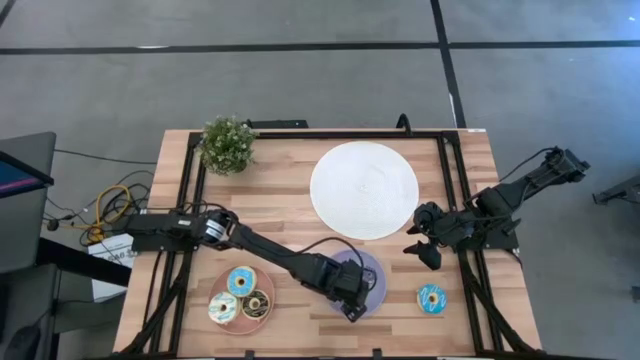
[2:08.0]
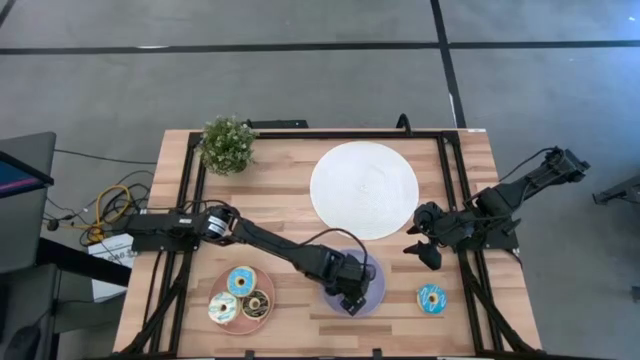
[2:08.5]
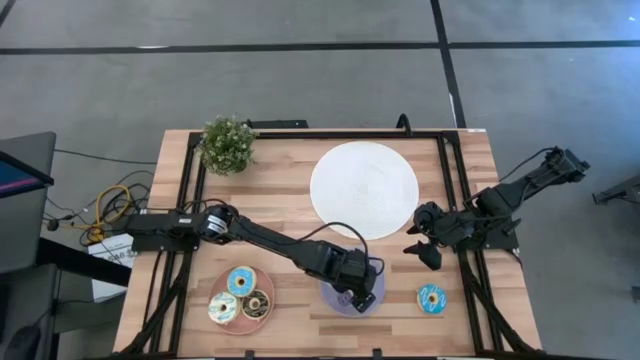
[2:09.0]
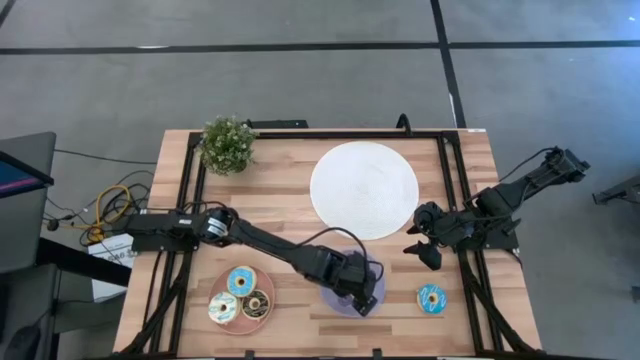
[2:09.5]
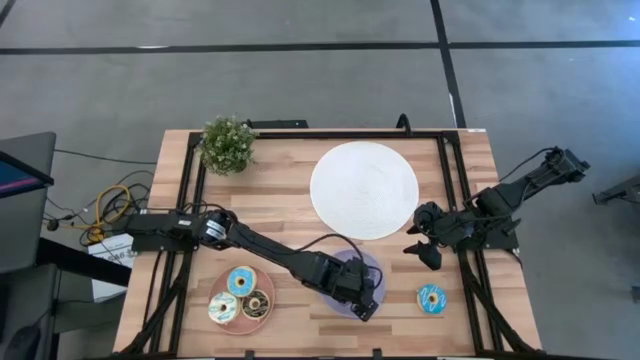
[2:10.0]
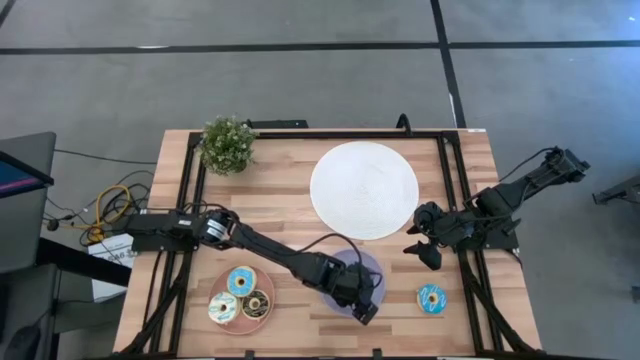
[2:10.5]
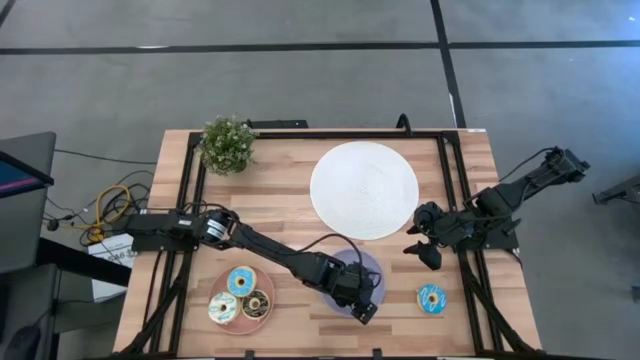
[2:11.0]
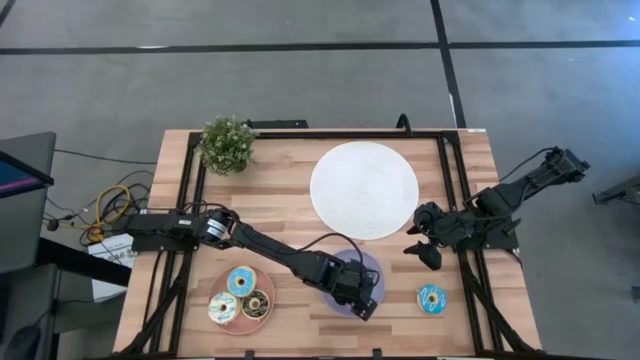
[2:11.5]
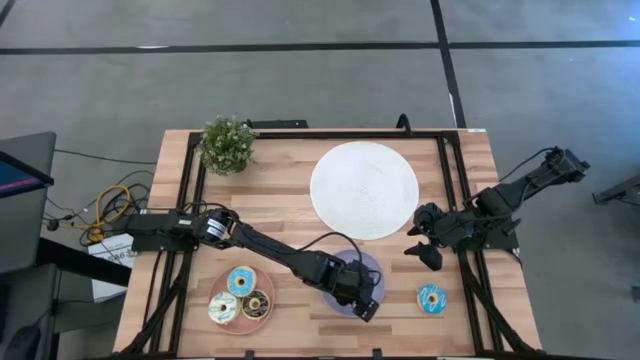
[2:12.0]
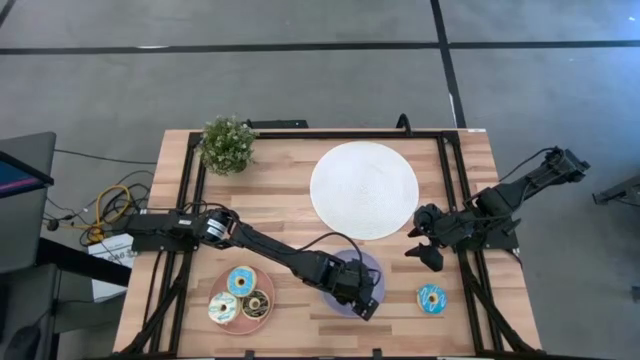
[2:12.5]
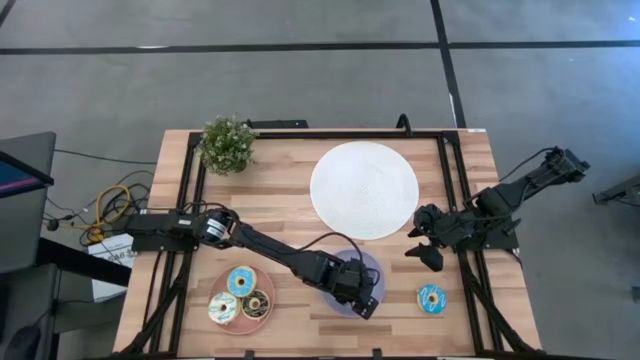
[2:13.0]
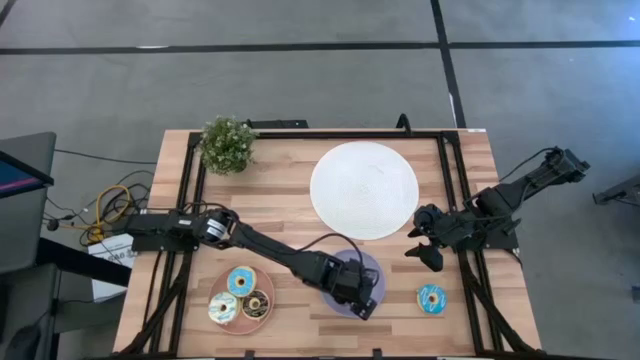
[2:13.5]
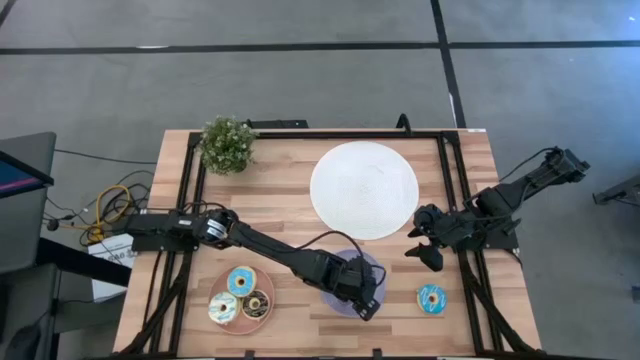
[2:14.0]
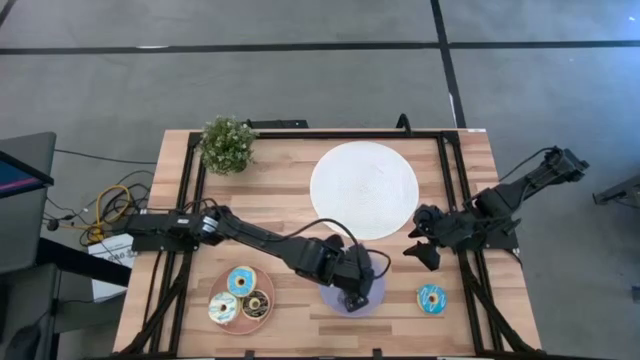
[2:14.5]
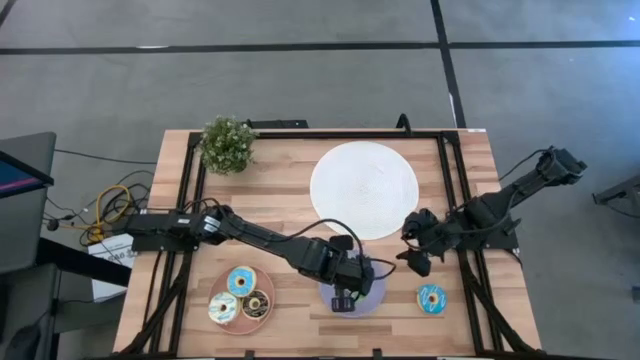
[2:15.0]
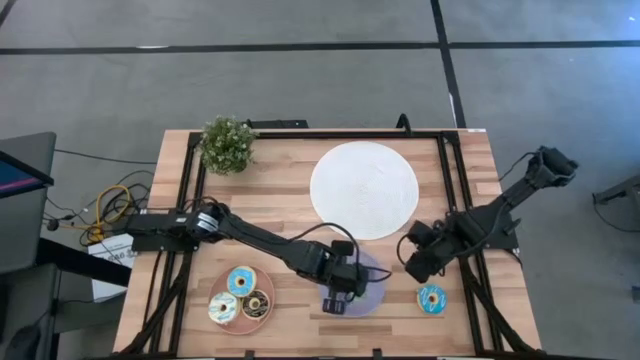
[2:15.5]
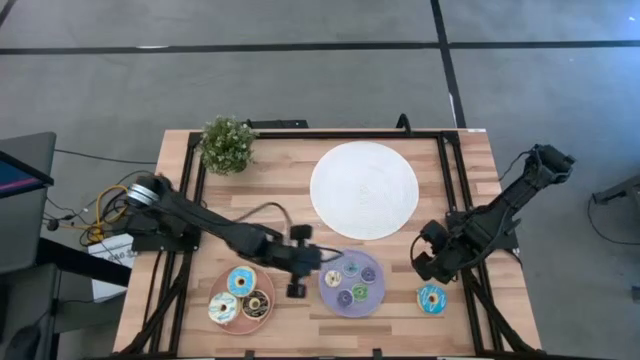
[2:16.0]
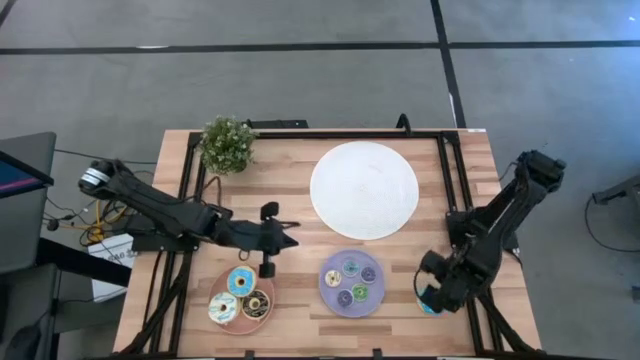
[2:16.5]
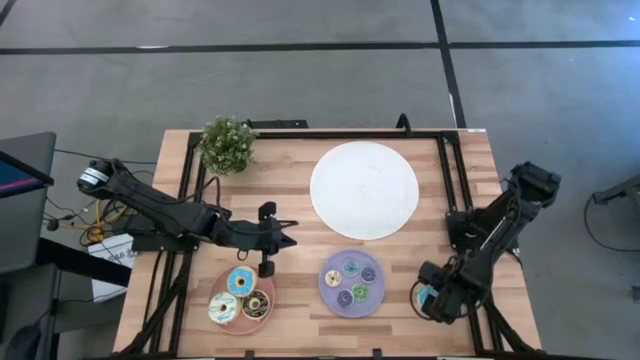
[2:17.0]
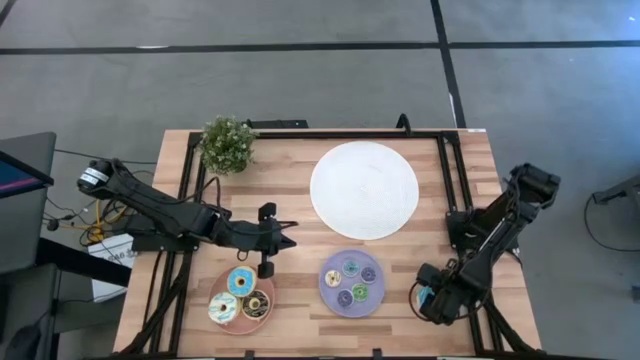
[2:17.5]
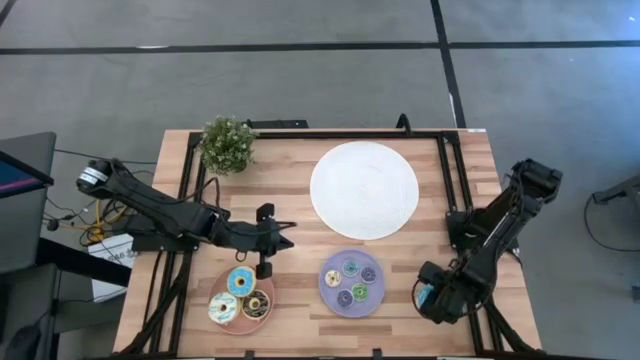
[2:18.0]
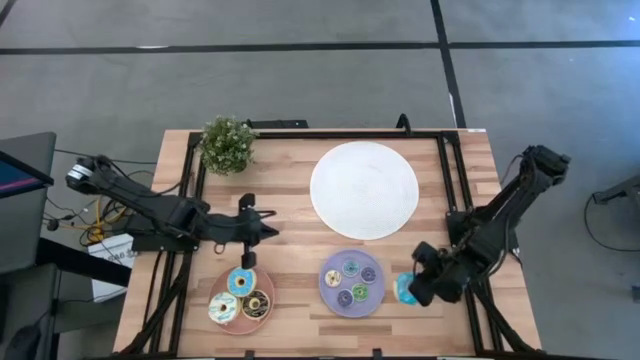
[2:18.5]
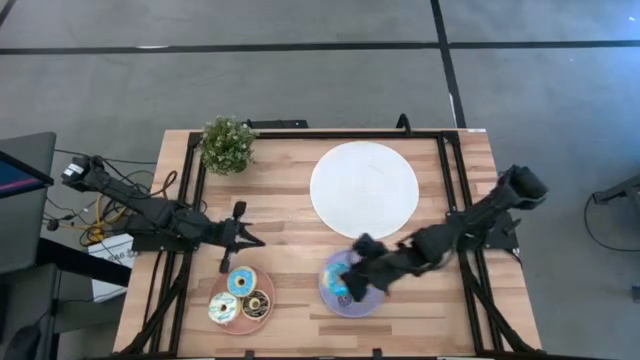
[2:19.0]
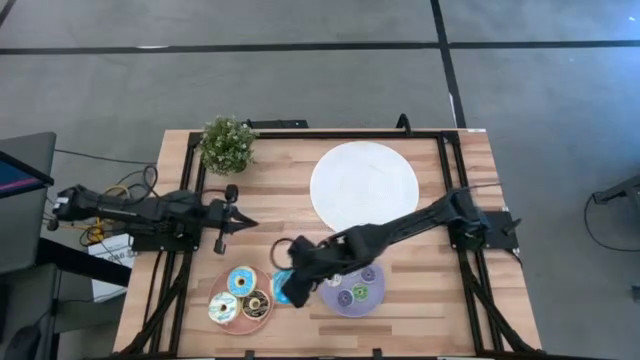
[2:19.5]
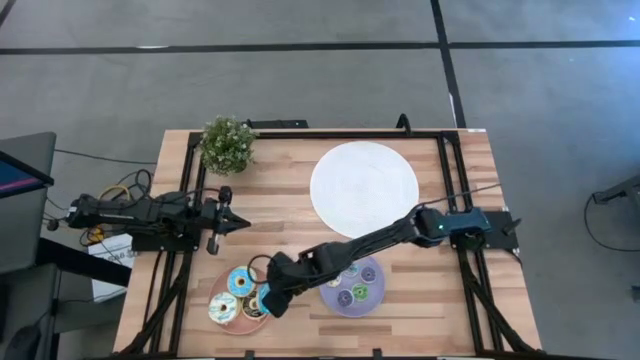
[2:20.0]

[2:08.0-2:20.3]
Task: Pick & Place donuts
Put the big light blue donut on the pink plate

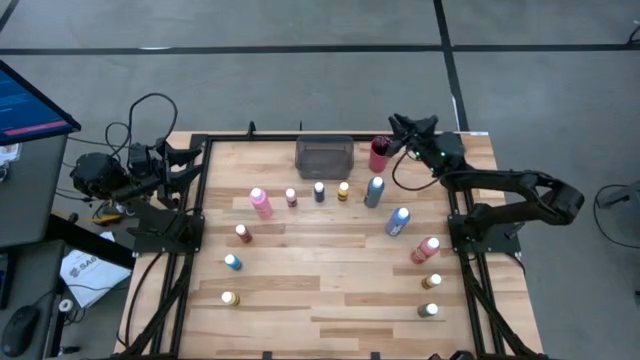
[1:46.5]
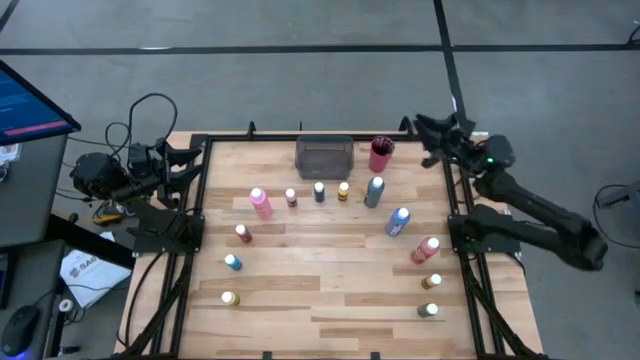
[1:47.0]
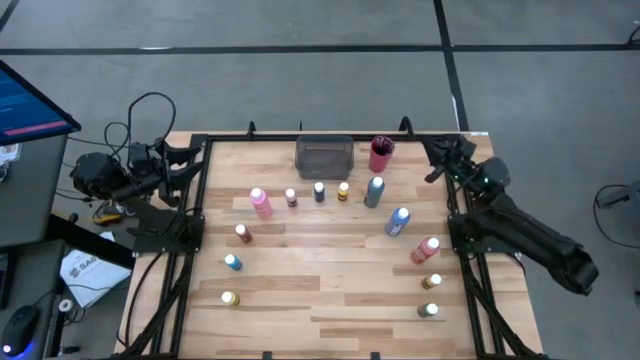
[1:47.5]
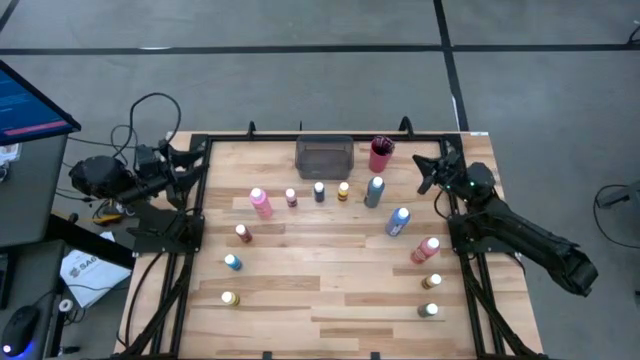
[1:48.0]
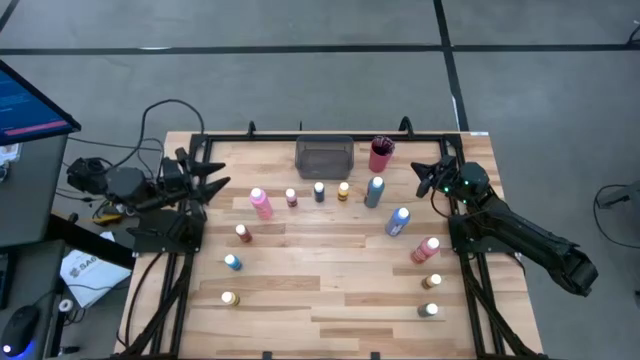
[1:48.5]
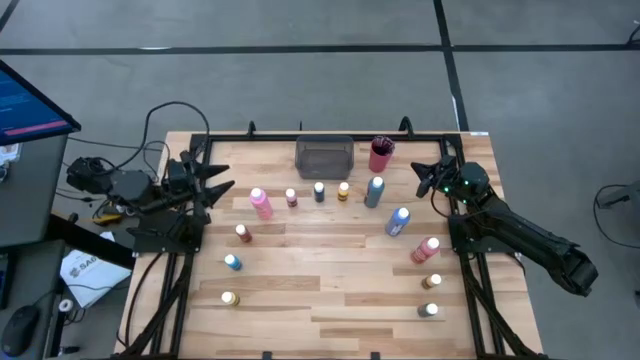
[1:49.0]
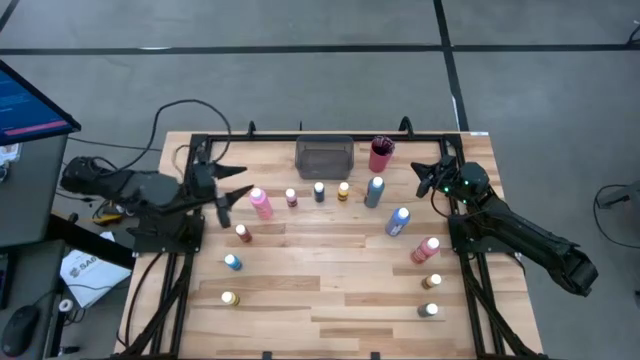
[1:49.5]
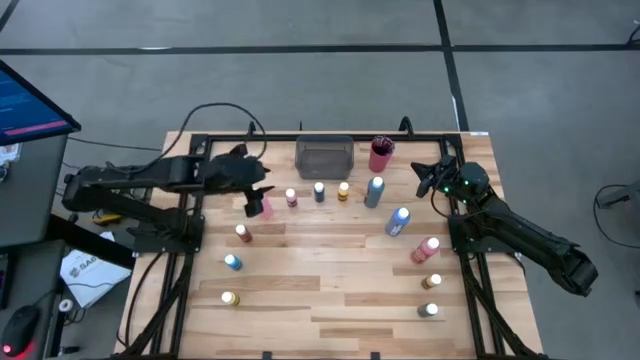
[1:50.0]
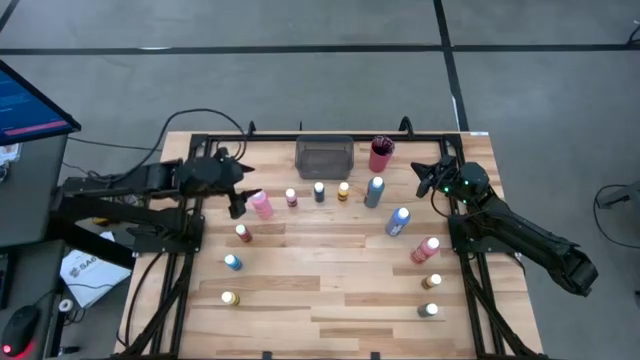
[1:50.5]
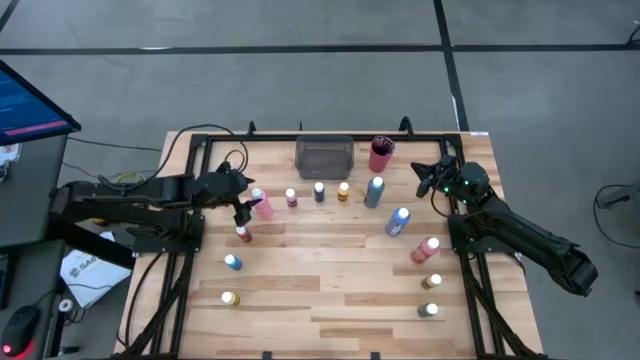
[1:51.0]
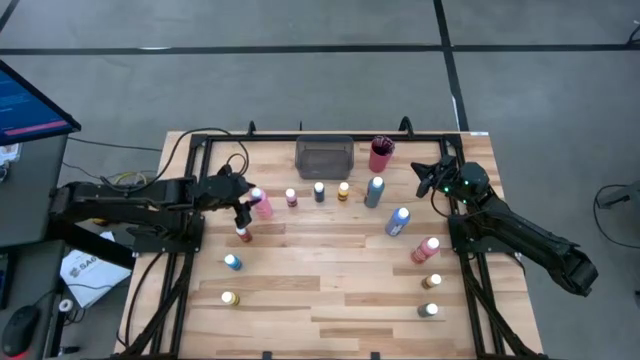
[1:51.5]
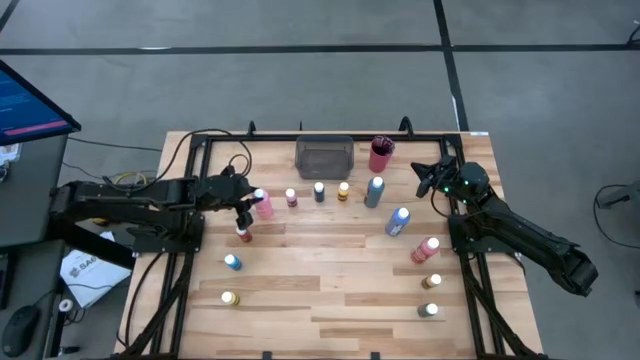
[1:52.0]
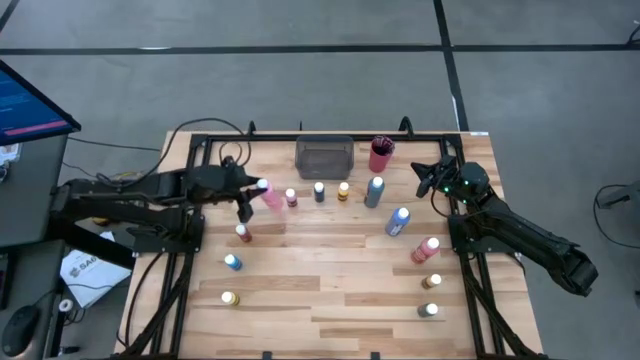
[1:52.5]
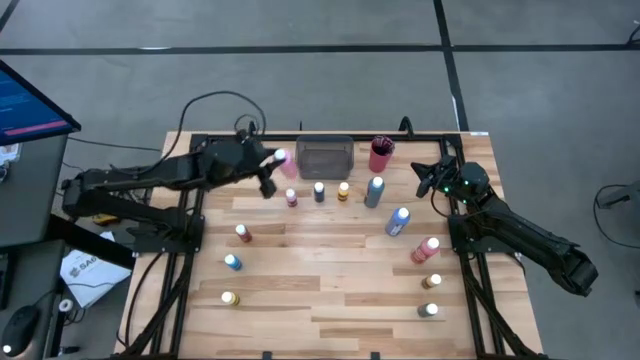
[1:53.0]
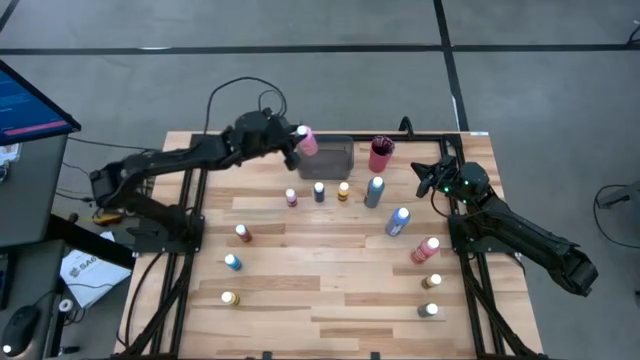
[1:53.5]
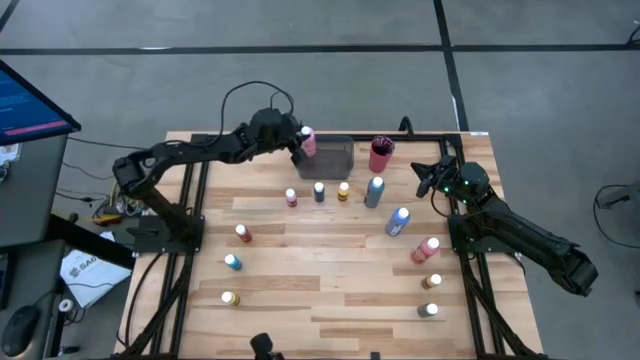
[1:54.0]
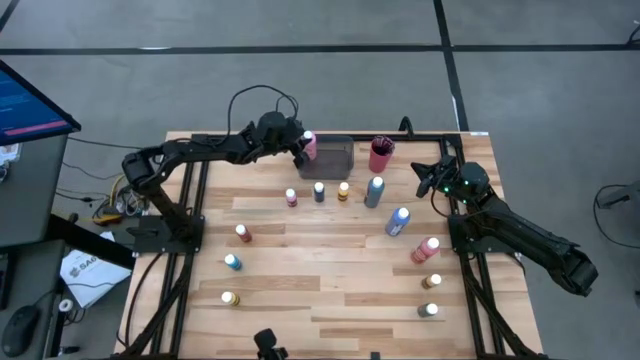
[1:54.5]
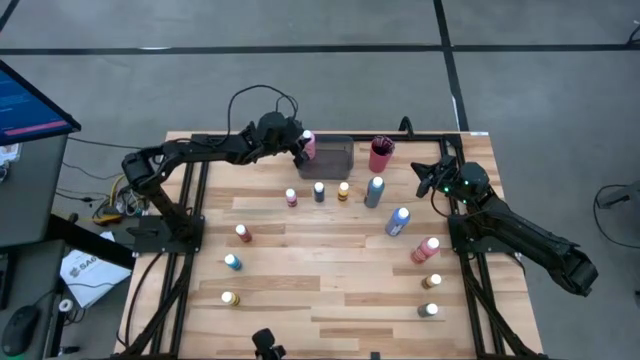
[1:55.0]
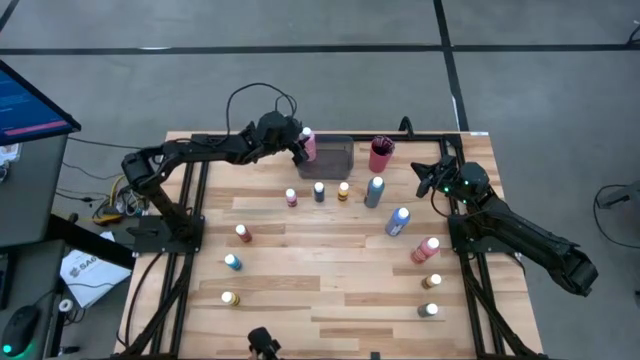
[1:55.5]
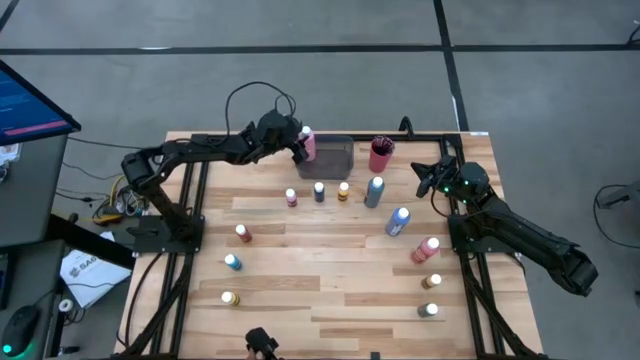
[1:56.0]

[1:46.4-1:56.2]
Task: Pick & Place Paint Supplies
Put the pink paint bottle into the gray bin
